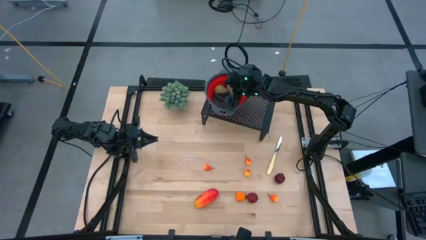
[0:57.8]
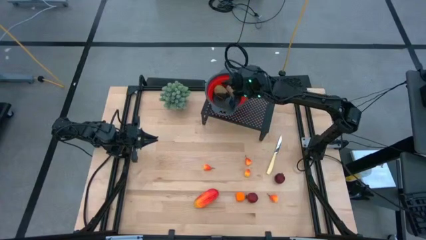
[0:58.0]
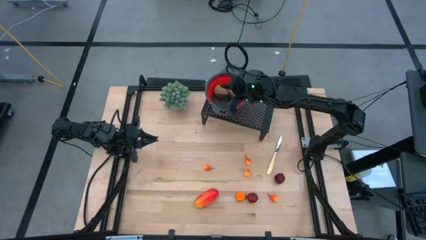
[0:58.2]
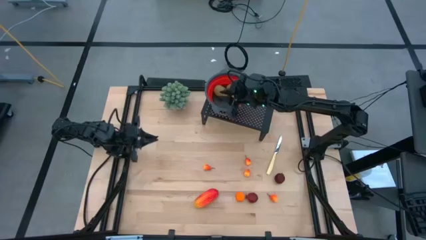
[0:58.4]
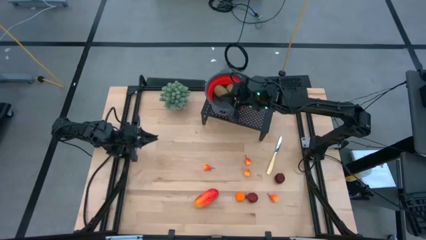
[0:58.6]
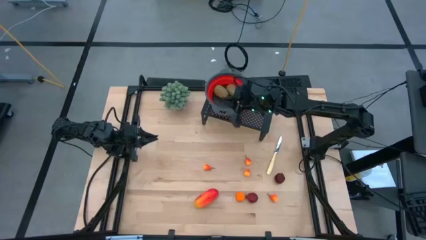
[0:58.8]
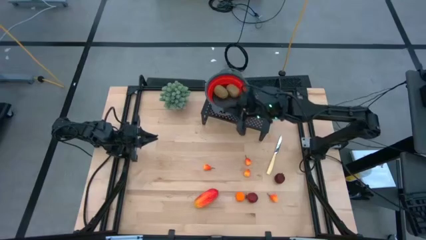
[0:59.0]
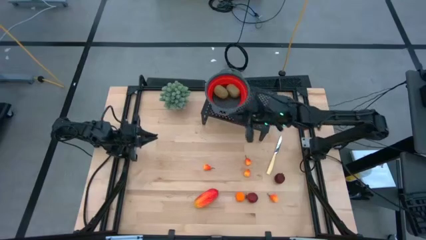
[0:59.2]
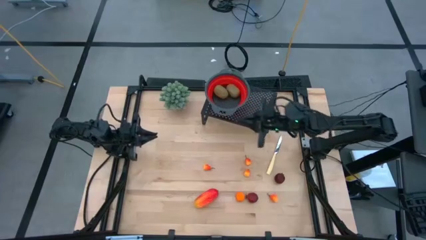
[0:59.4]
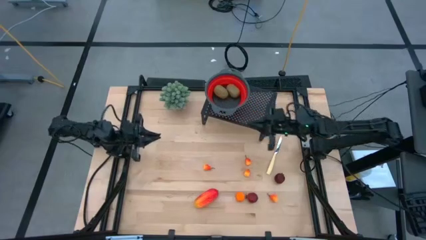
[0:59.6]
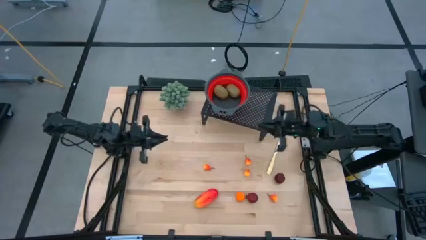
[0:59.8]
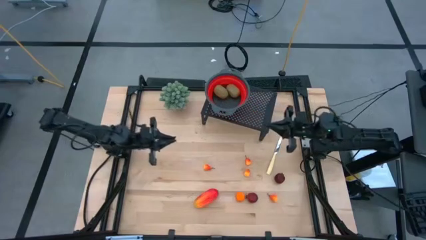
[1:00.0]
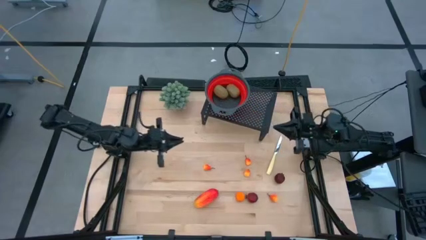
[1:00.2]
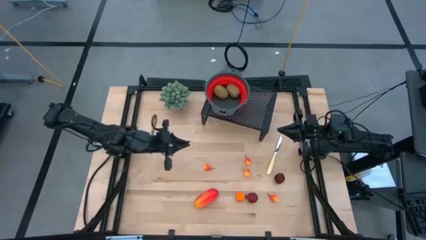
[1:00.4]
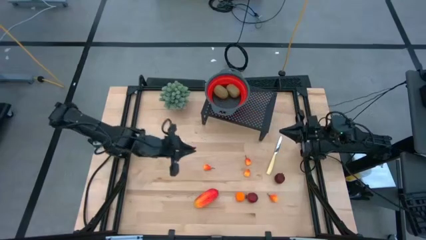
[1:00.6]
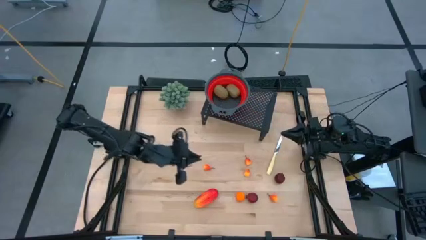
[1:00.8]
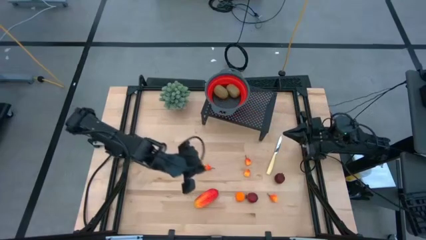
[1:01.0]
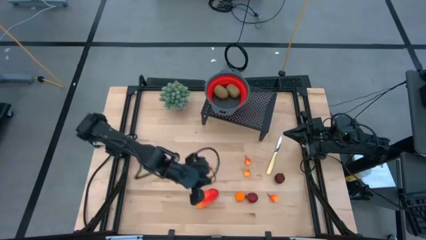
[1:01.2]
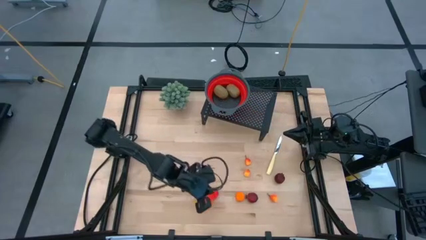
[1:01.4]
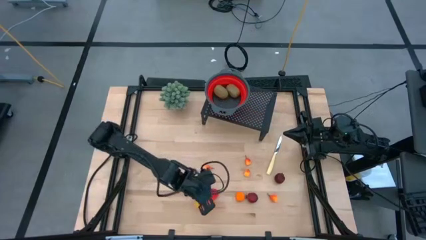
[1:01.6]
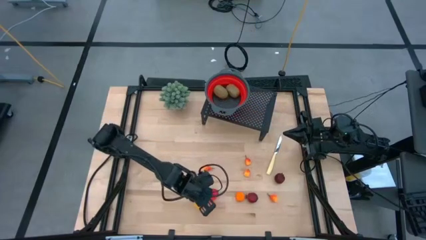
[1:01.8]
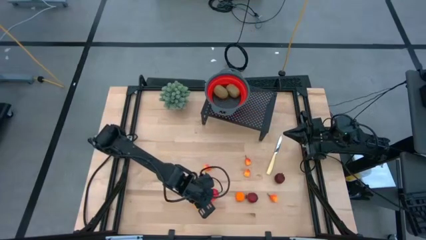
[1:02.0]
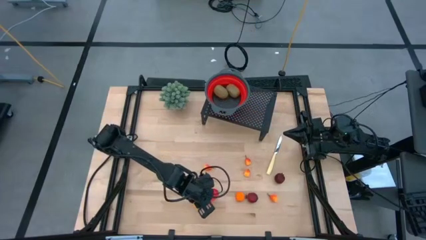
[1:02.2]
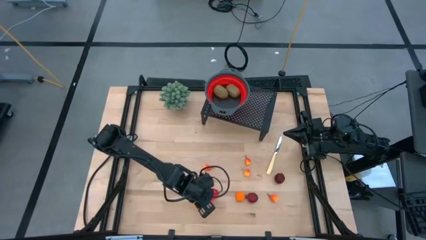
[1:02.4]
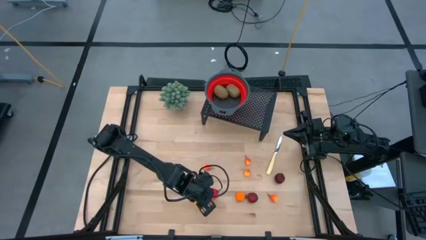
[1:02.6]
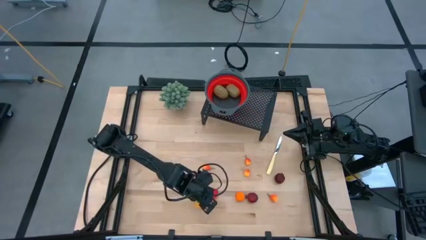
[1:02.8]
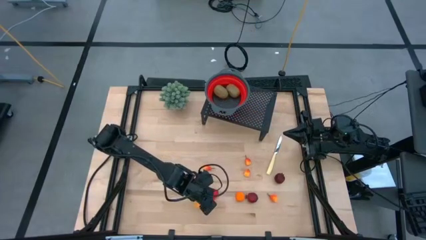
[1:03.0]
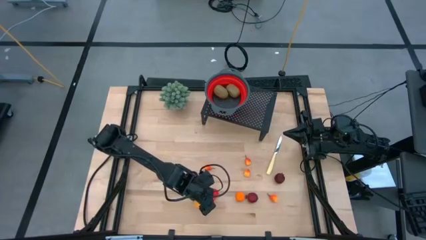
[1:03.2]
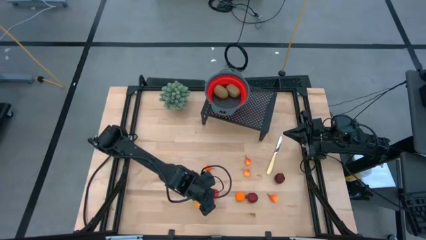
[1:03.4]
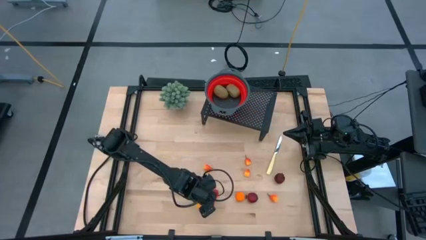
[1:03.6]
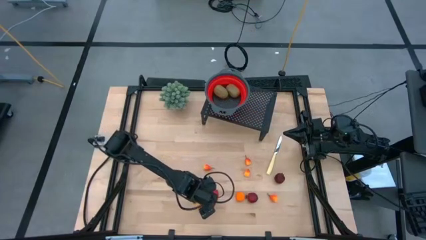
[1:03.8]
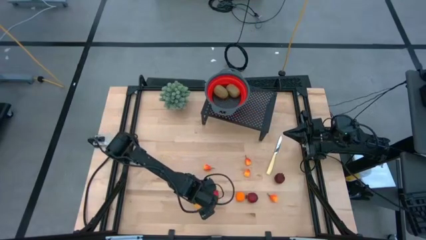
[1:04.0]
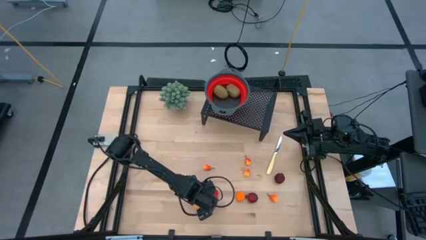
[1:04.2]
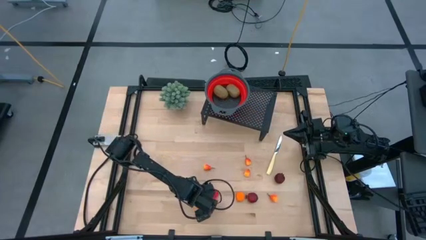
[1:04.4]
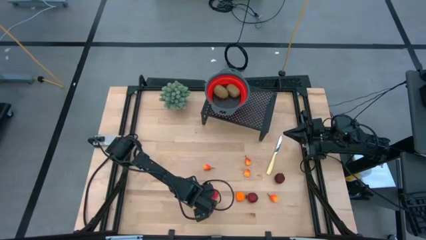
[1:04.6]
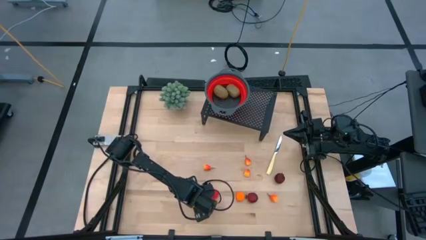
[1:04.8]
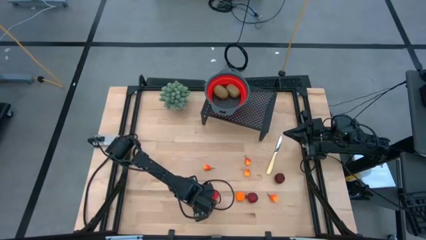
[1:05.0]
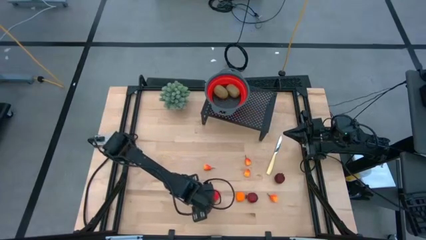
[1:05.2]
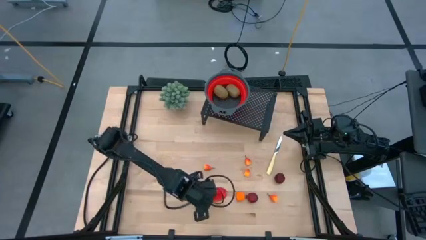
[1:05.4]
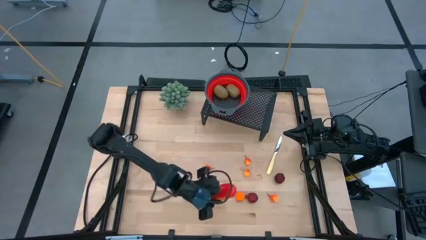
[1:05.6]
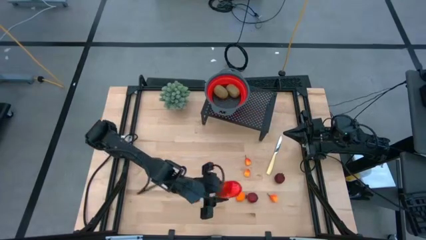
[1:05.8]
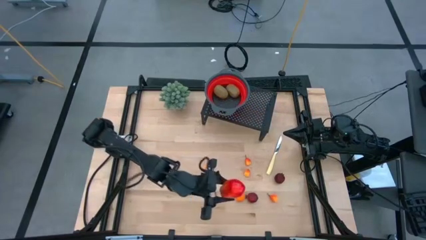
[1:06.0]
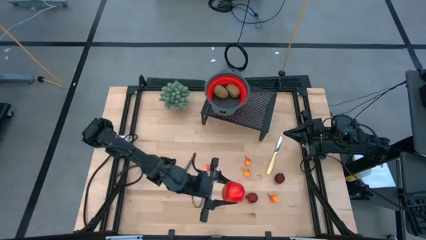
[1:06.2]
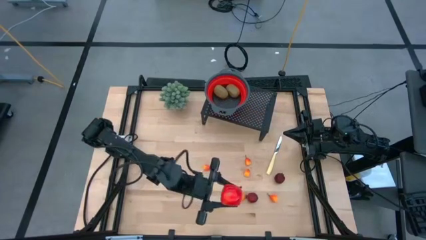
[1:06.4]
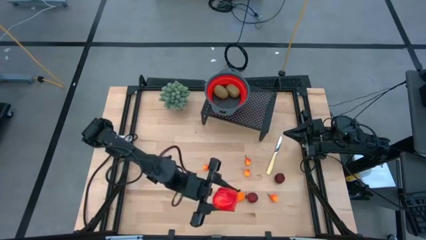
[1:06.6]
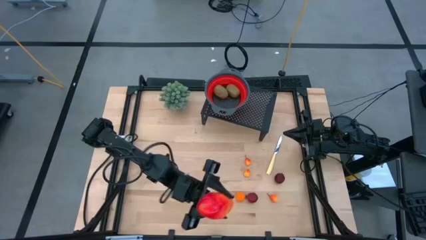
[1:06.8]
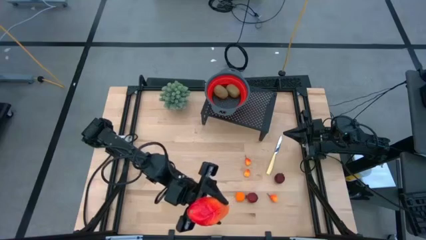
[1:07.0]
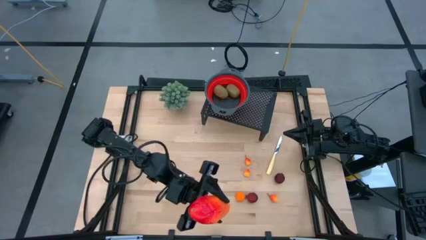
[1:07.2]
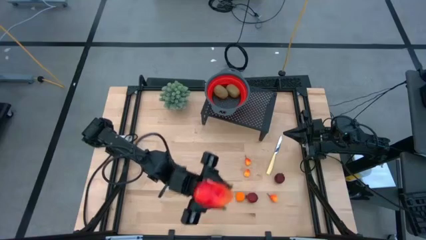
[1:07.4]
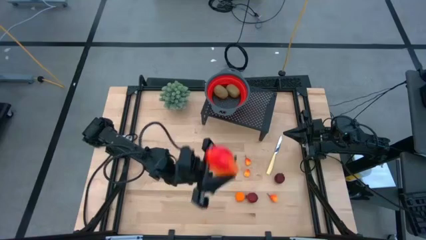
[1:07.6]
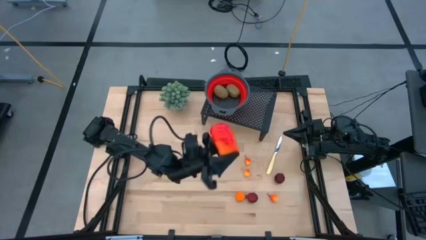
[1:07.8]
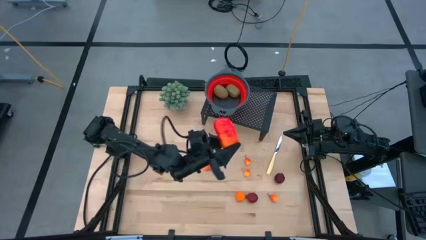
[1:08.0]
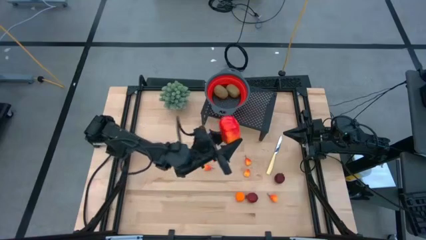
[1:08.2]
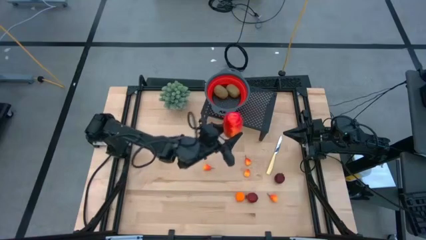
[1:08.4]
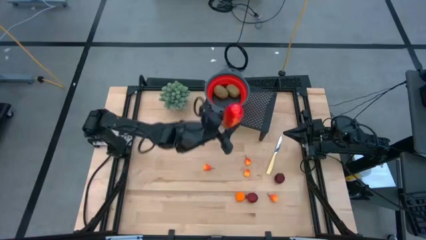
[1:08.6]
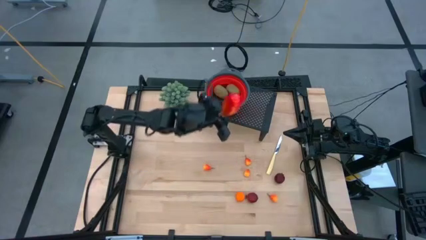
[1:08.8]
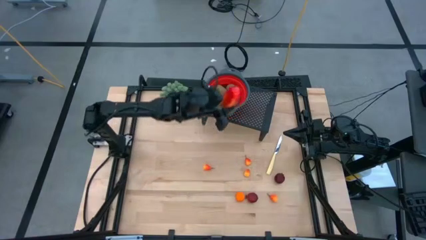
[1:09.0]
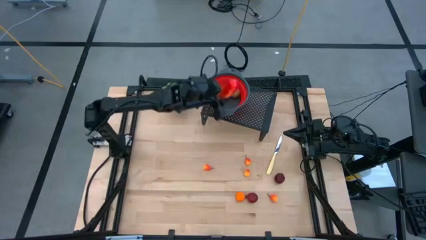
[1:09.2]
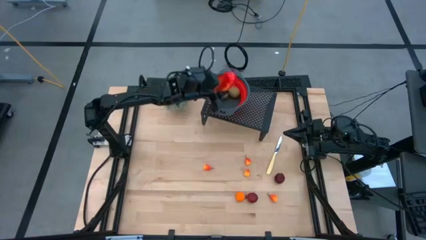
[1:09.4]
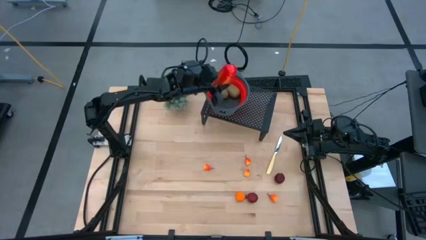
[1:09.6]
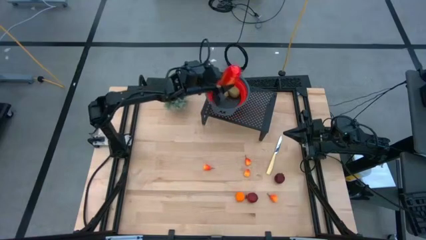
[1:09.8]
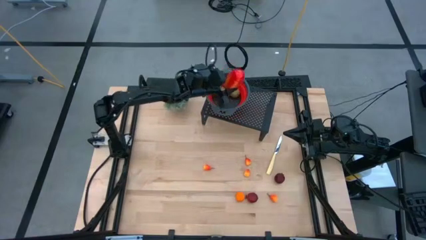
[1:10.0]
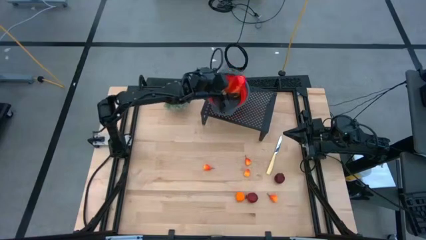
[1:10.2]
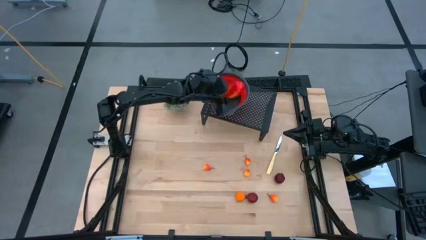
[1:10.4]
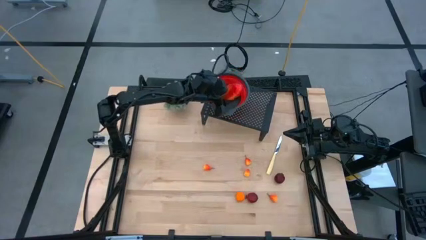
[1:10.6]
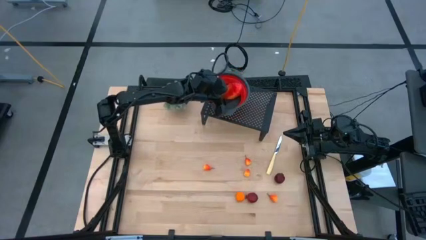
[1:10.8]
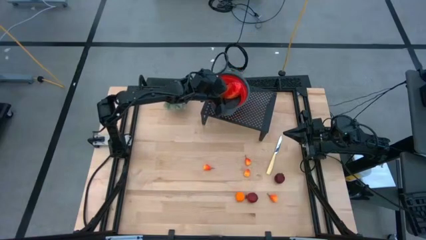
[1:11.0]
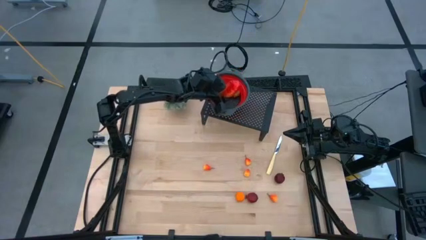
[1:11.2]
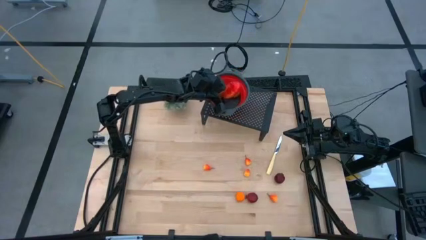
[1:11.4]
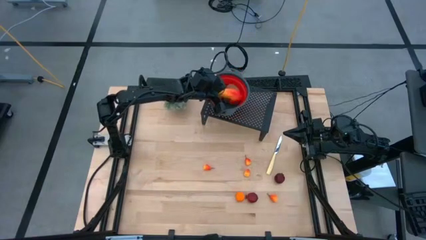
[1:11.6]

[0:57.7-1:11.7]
Task: Pick & Place Fruit
Put the mango into the red strainer bowl
